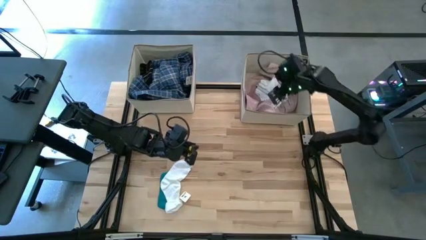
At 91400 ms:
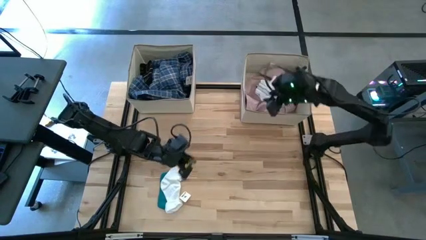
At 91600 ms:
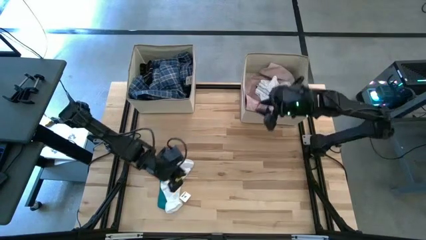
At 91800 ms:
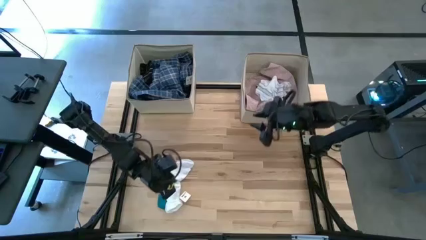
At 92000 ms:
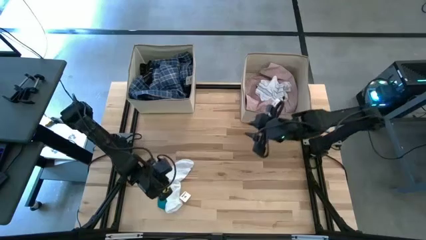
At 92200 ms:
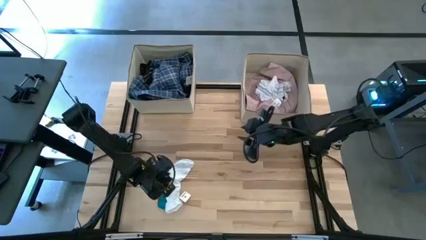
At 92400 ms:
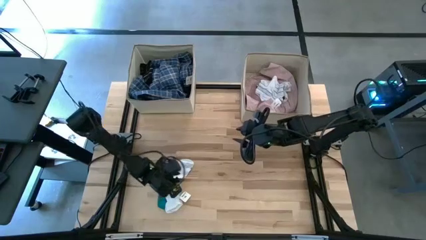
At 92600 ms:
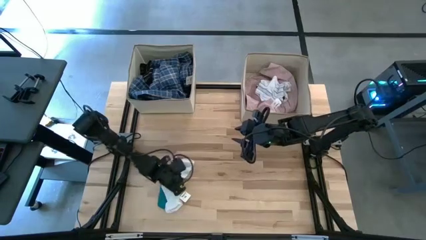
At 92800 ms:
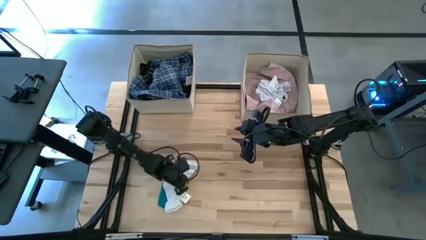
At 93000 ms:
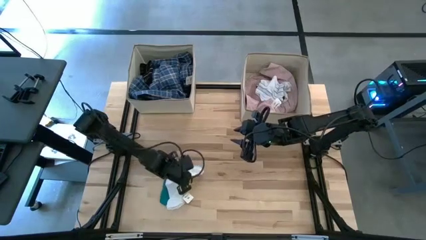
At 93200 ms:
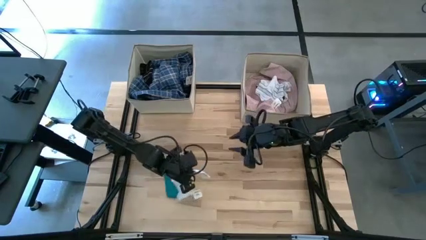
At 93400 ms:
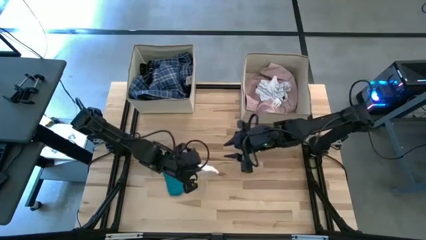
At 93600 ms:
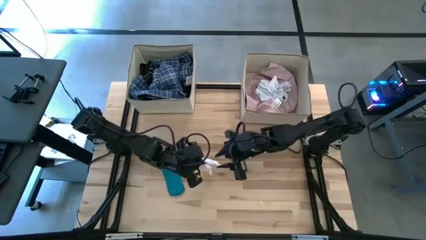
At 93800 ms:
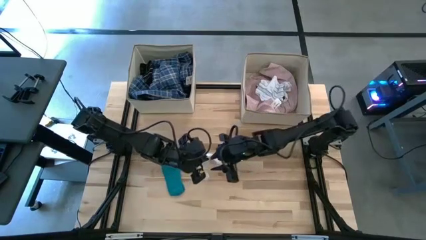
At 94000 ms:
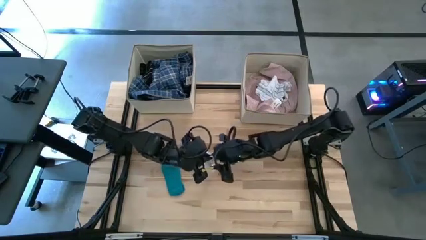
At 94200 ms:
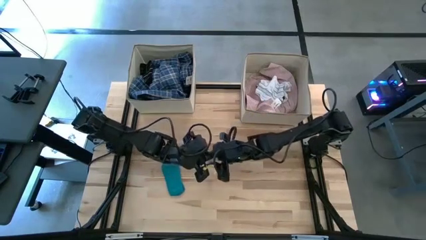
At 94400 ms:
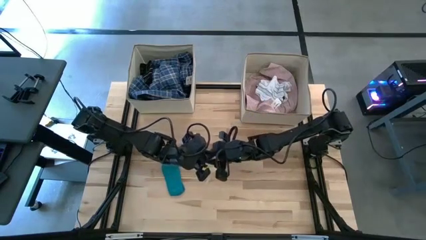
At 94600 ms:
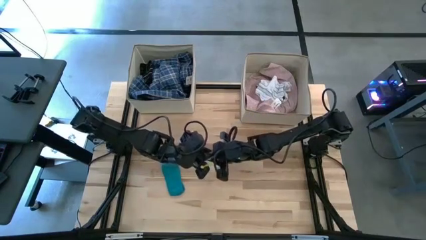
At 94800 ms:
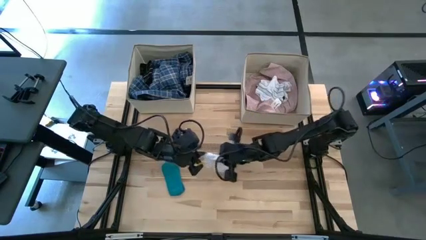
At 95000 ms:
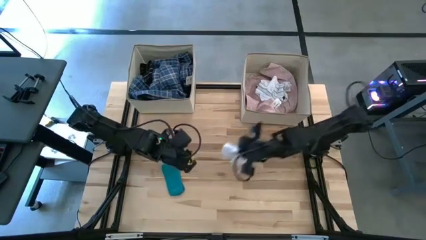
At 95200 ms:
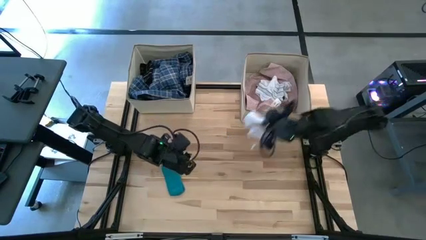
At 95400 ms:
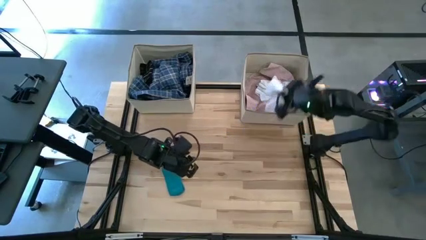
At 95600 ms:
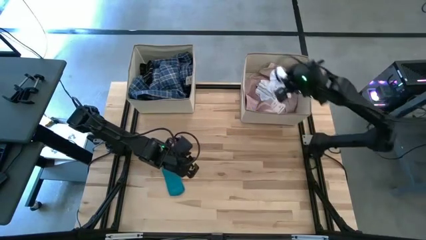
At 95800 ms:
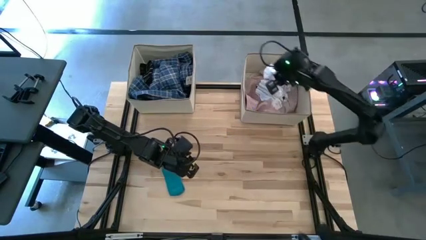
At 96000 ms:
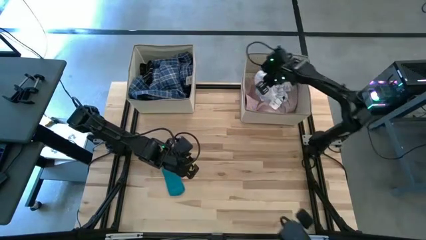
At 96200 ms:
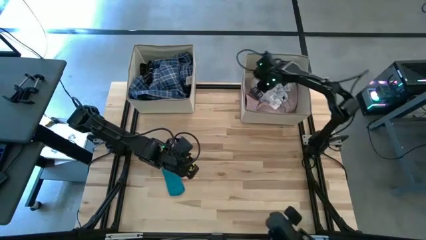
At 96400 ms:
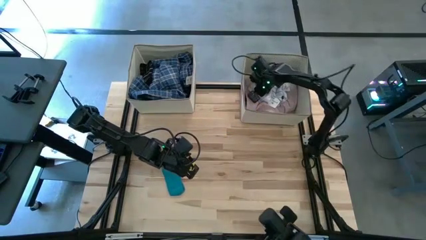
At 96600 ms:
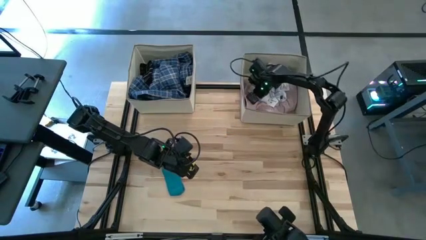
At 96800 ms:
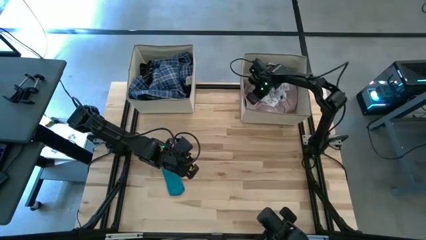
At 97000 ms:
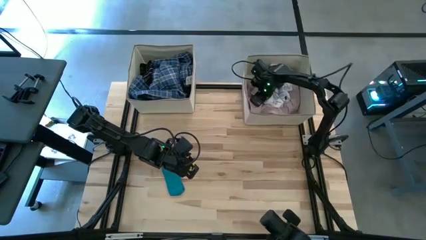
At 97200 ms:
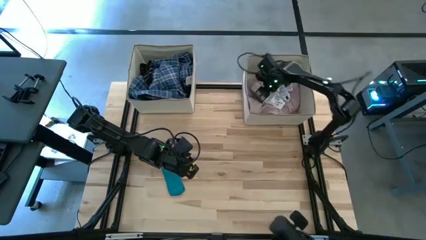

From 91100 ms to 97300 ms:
Task: Sort clothes
Put the white sock into the right laundry organizer

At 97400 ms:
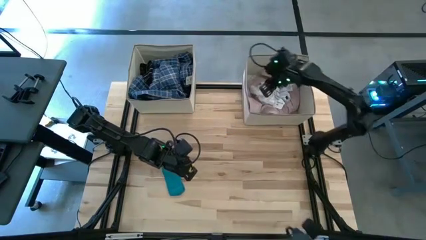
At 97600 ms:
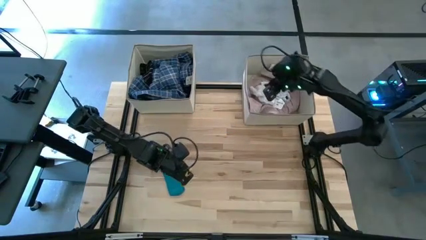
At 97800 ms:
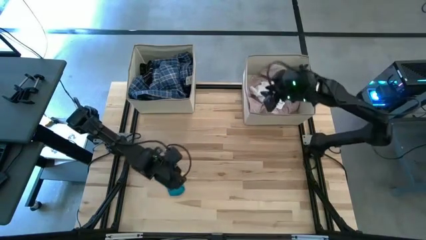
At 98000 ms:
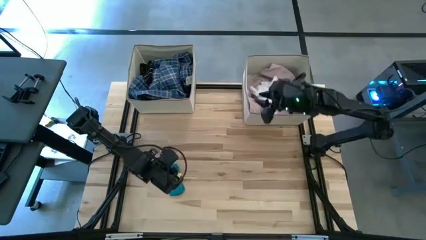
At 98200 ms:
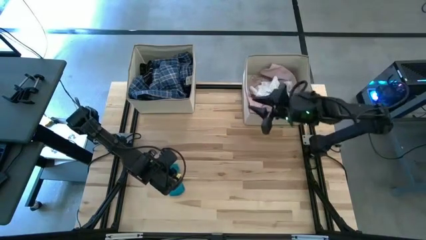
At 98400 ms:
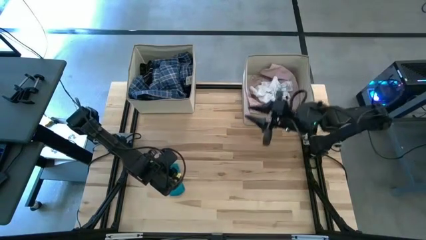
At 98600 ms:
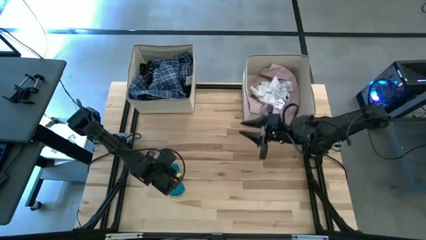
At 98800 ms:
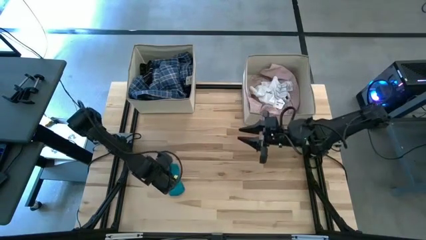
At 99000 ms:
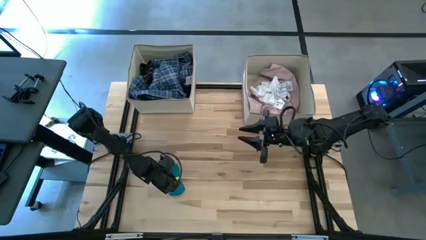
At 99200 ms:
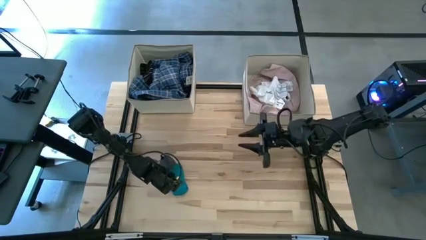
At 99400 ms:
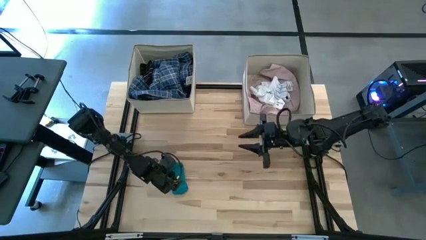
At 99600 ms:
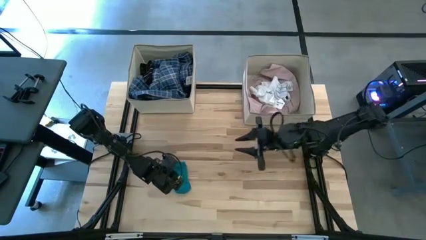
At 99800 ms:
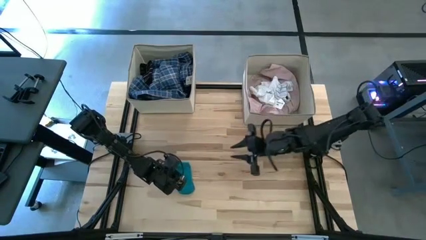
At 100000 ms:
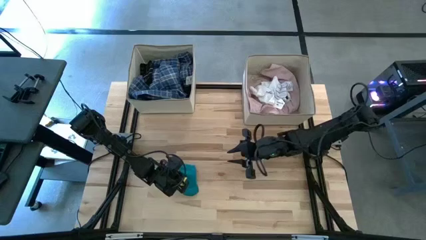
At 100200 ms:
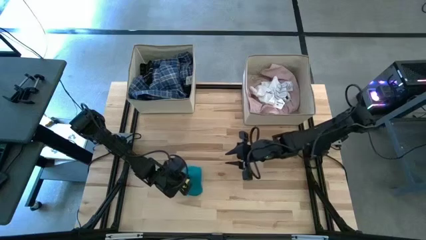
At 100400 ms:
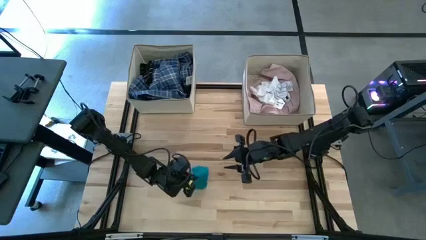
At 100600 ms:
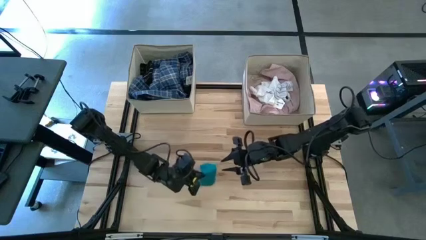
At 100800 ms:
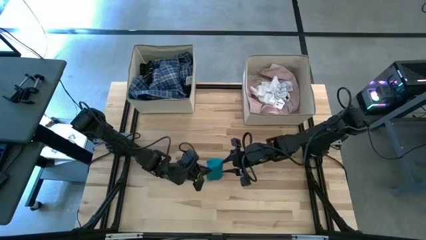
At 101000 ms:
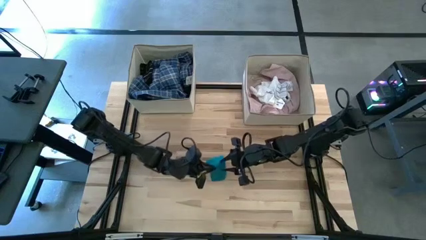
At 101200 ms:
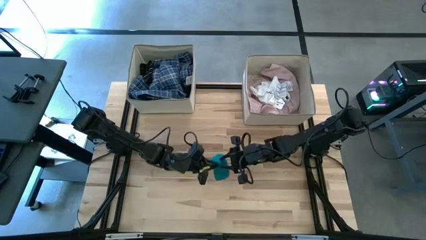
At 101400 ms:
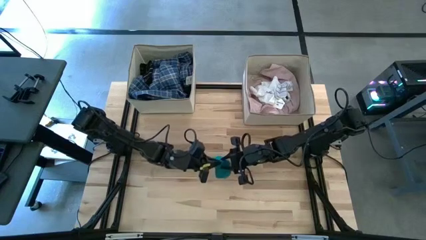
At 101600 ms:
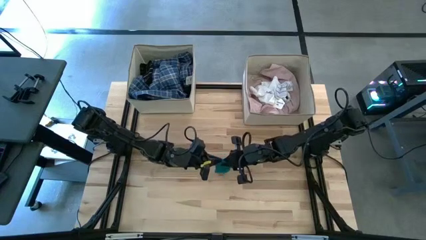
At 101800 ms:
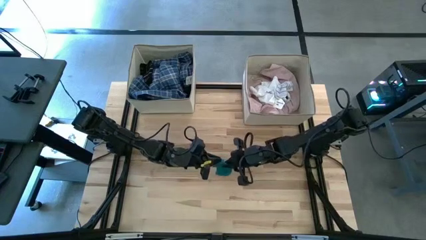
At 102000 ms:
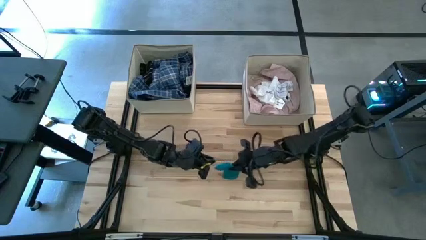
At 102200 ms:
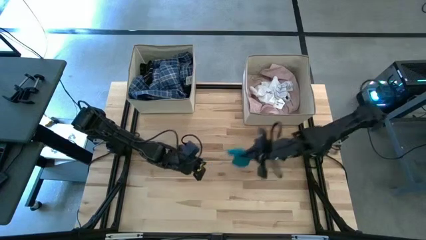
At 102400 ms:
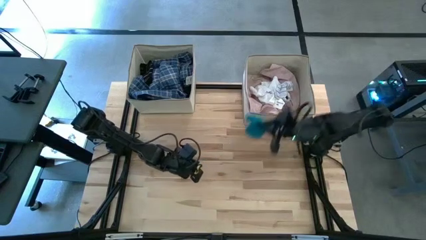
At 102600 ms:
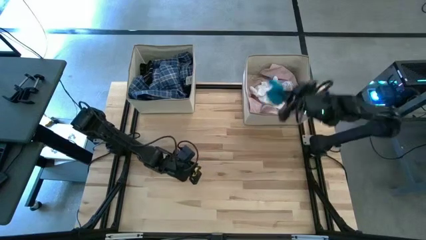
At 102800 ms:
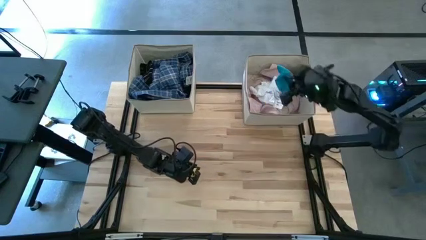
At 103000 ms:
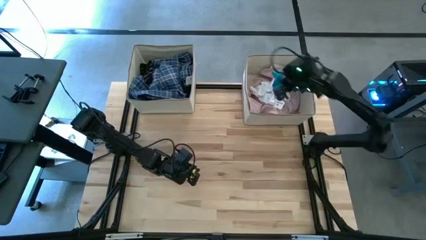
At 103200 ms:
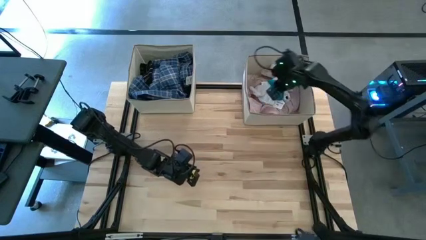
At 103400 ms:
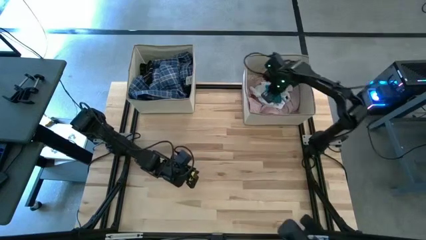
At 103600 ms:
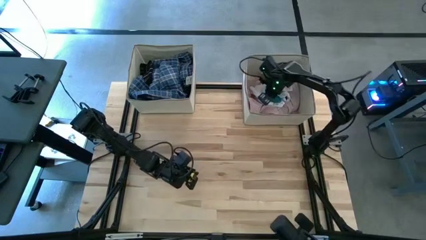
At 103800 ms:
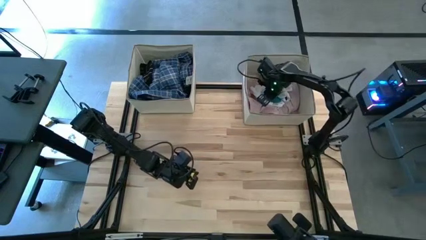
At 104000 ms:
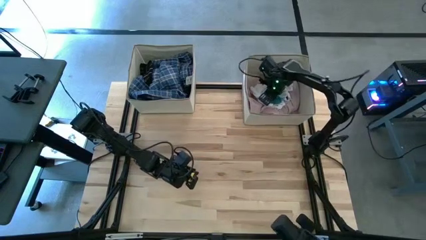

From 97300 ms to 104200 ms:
Put the blue sock into the right laundry organizer

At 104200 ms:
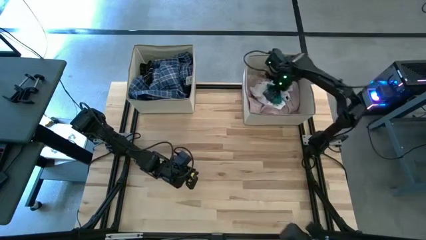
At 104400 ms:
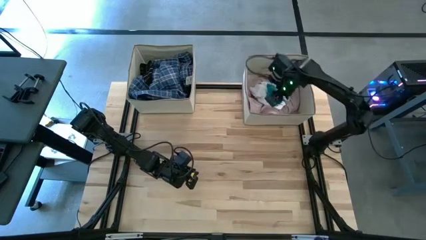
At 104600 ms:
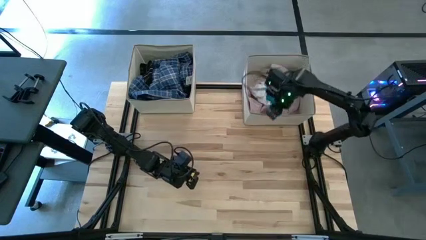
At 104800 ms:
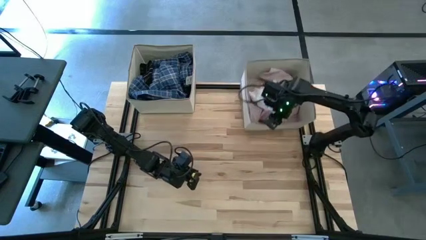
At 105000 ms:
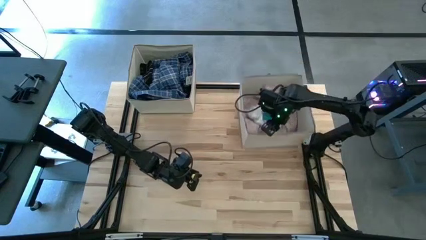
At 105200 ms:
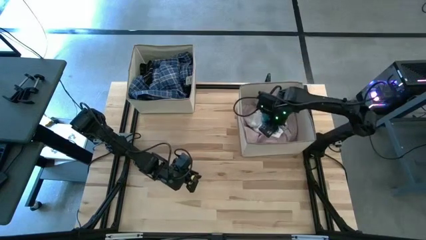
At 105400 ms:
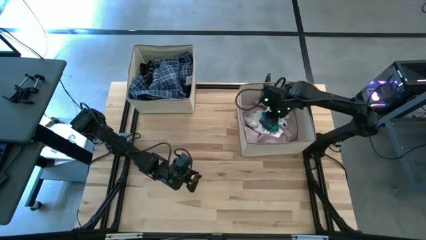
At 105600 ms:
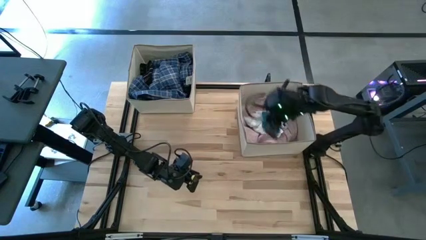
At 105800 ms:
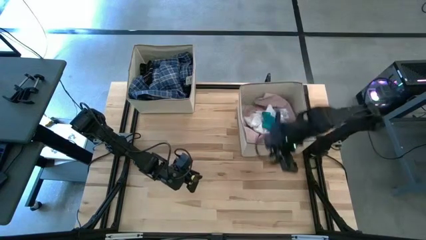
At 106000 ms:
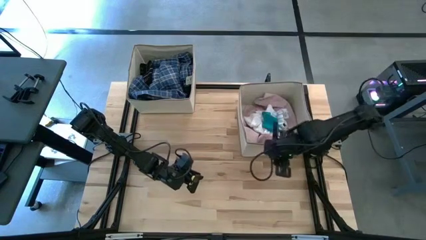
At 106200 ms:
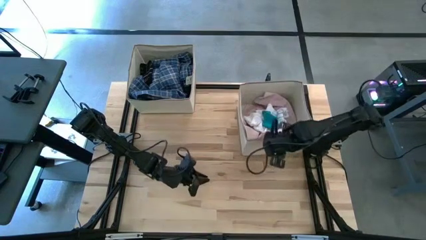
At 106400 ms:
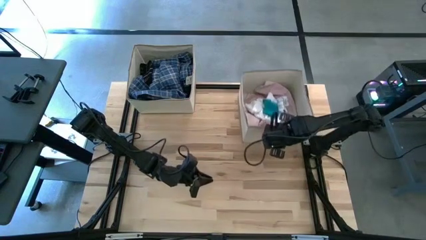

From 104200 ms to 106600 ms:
Adjust the right laundry organizer
